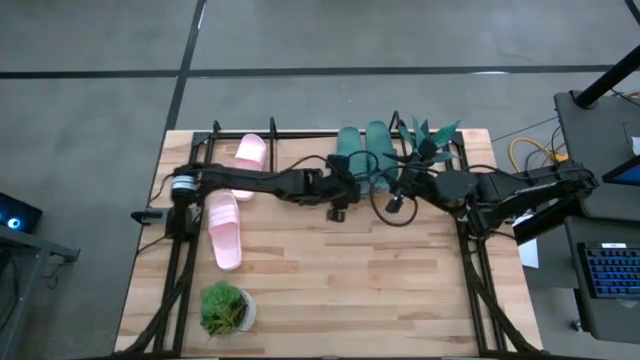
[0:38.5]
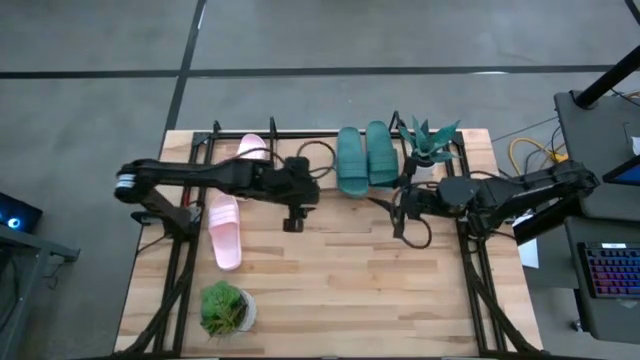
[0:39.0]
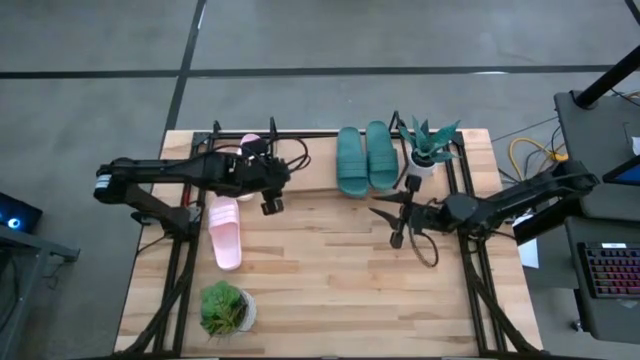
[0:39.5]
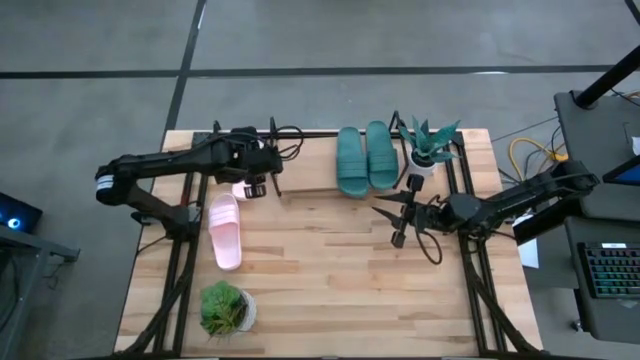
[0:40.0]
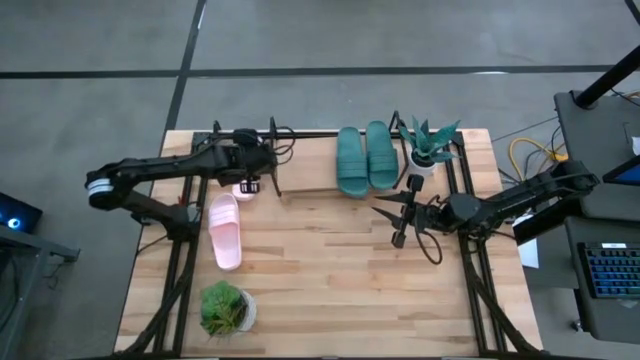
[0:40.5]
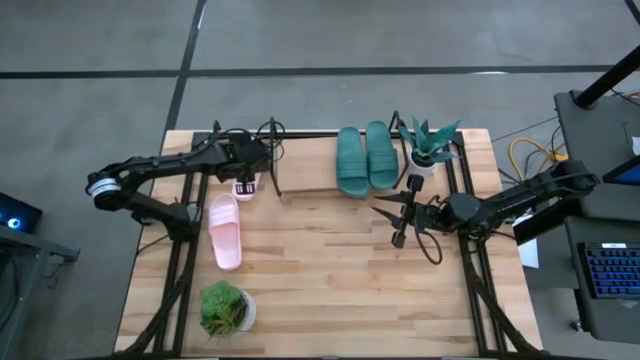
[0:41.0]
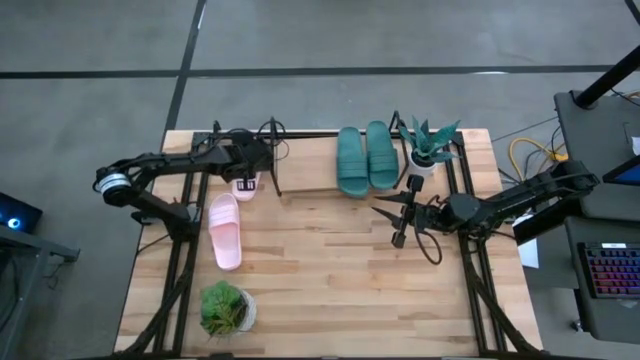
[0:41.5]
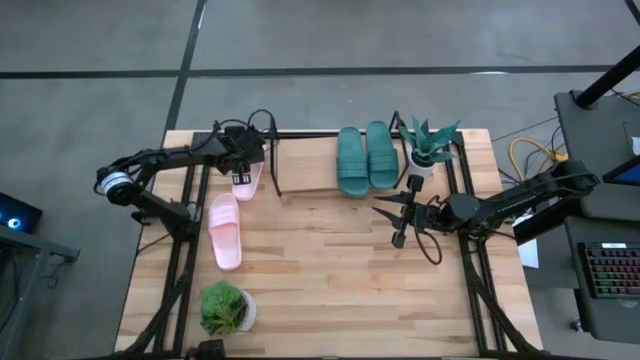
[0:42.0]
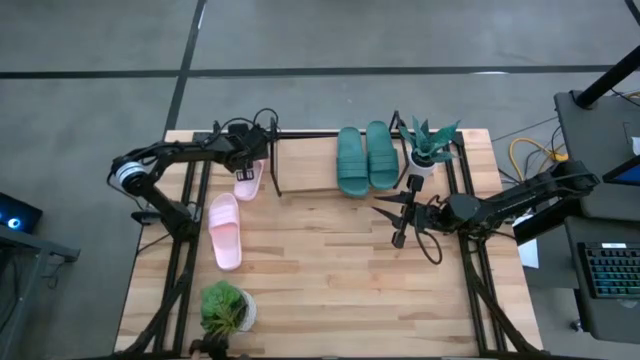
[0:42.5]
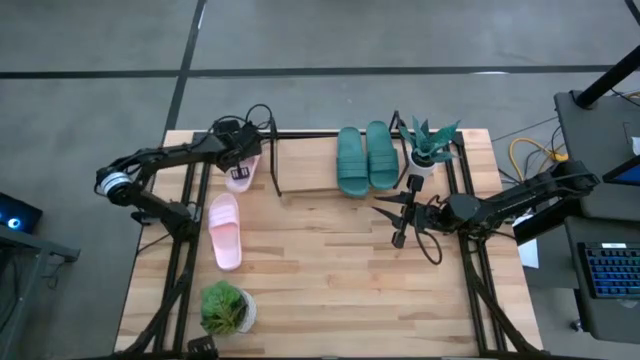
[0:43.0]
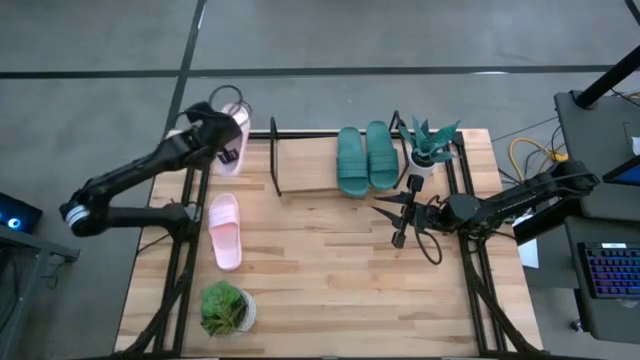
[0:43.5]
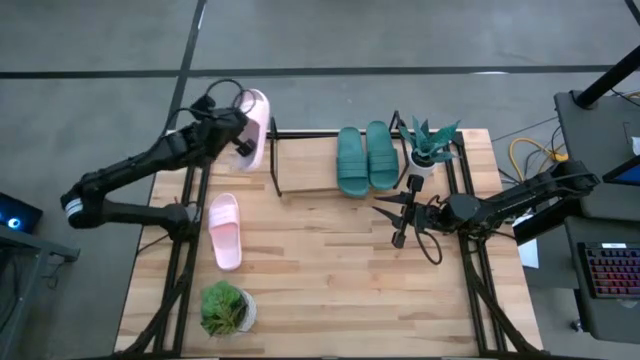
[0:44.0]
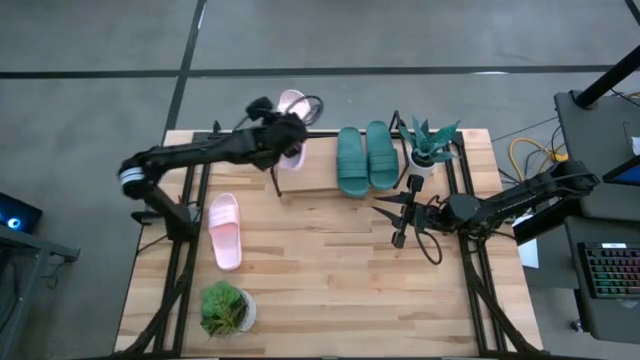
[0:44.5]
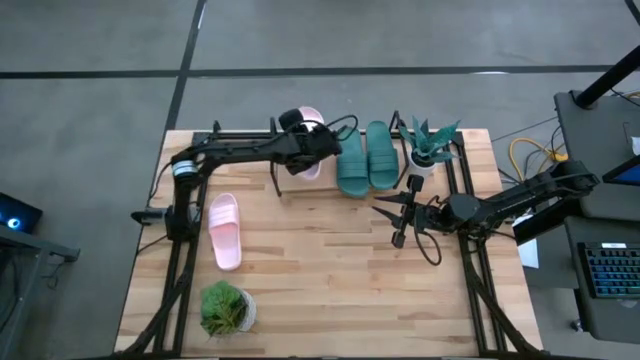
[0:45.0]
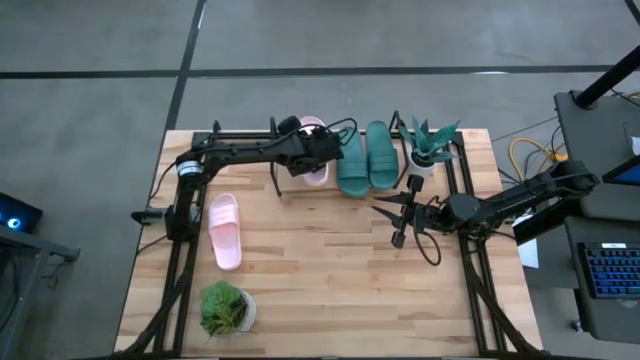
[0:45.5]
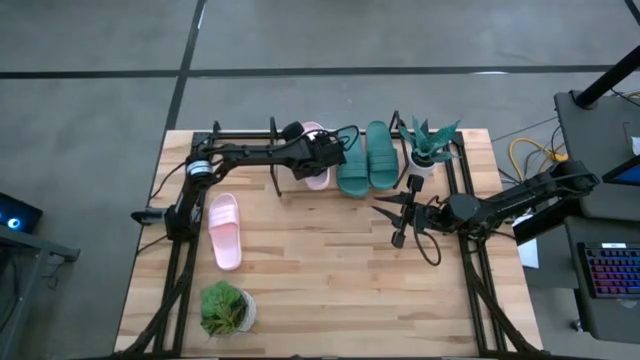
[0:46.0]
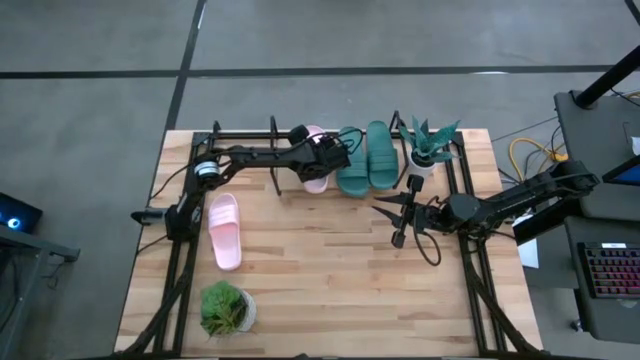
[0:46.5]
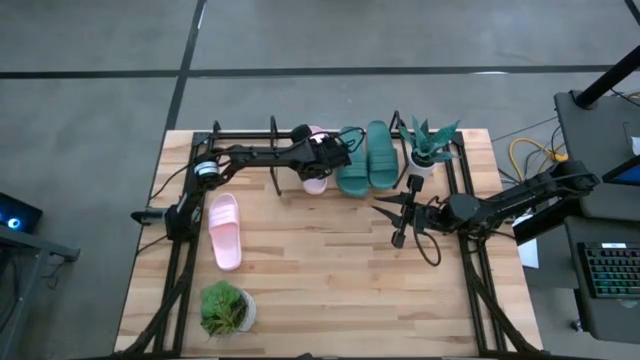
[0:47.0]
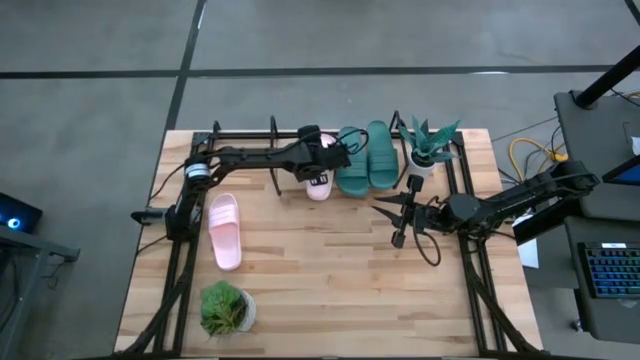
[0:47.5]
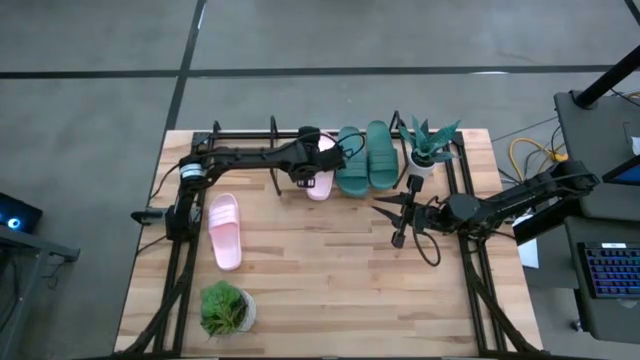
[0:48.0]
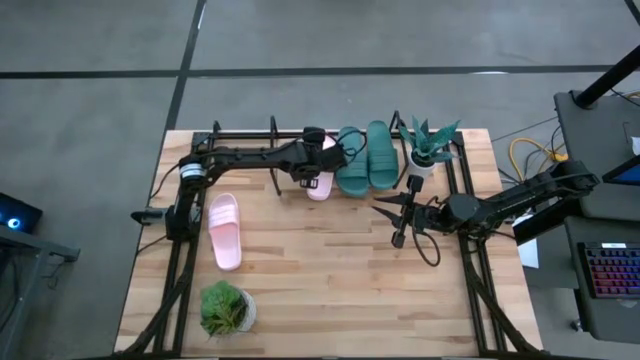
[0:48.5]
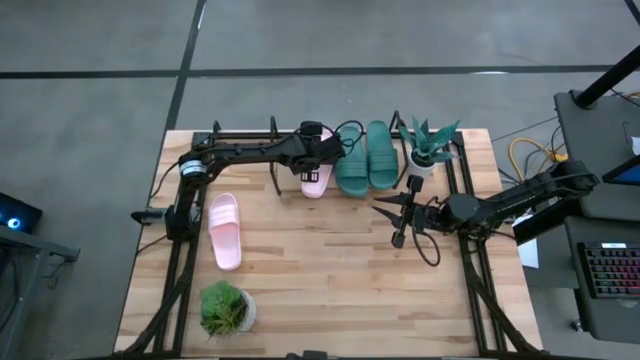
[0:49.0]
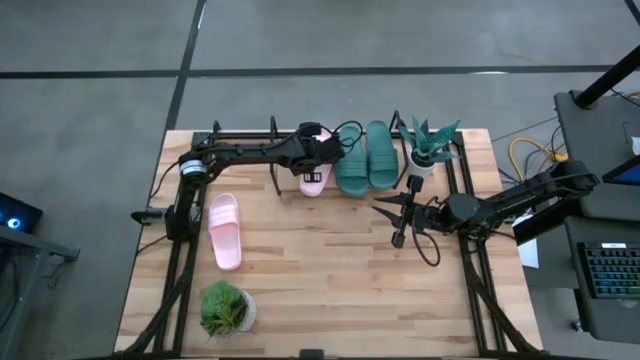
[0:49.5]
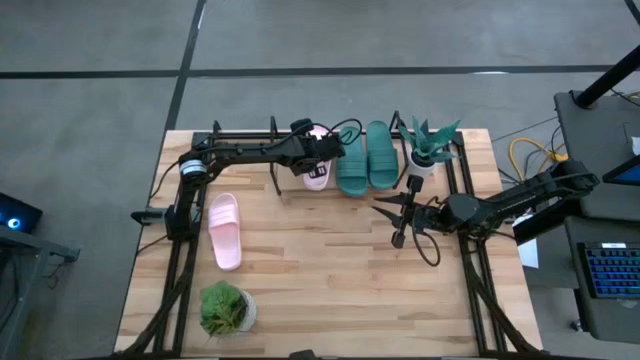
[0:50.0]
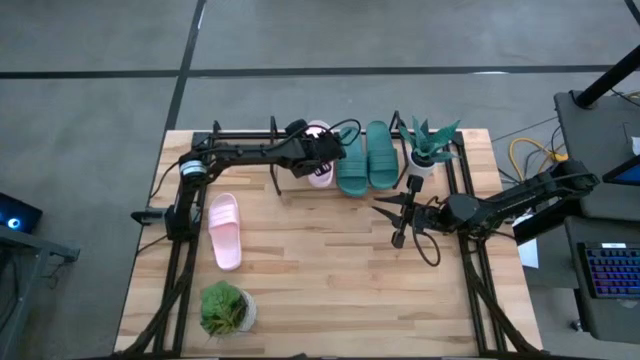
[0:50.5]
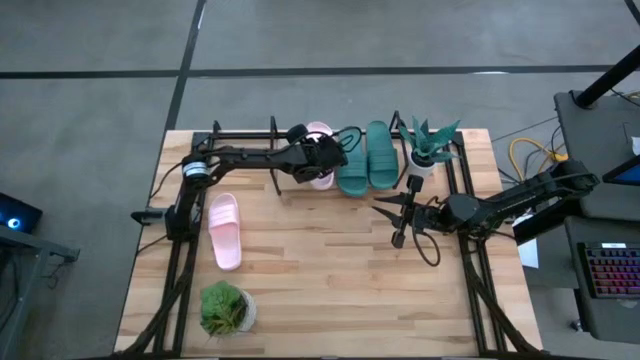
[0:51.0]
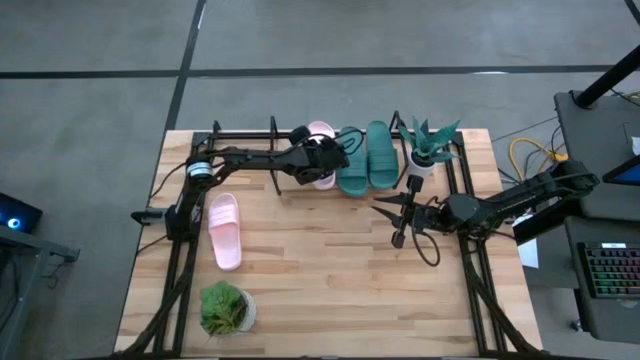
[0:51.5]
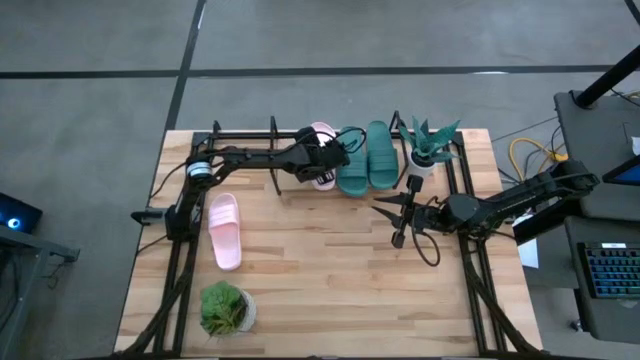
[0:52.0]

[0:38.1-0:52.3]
Task: Pick and place slides into the shelf
Put the top pink slide on the shelf

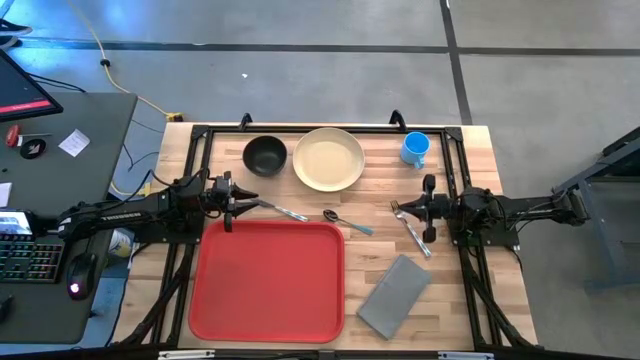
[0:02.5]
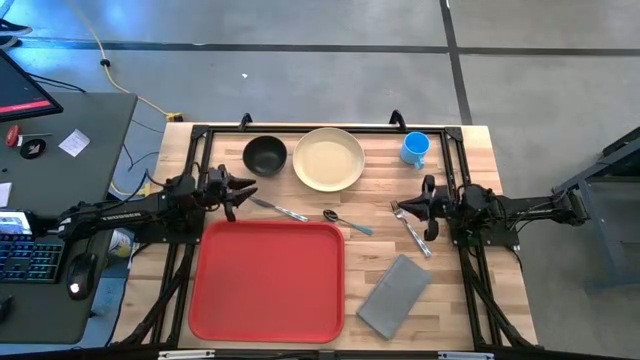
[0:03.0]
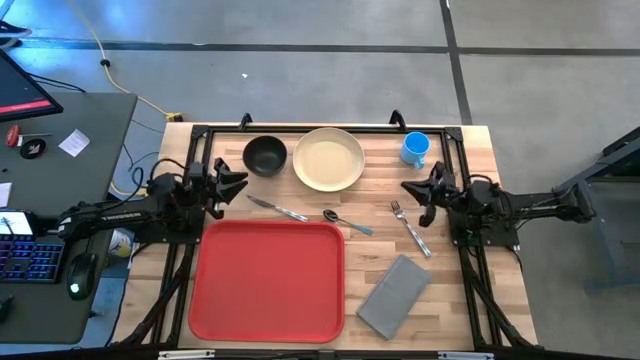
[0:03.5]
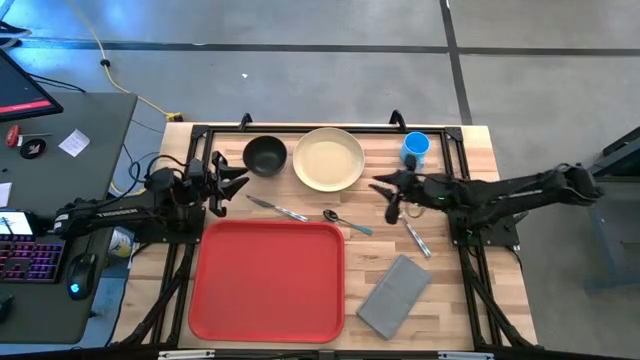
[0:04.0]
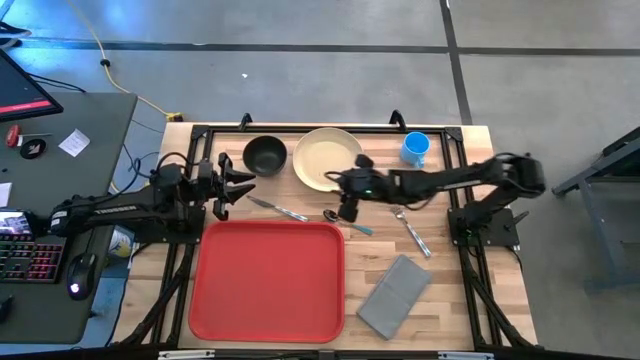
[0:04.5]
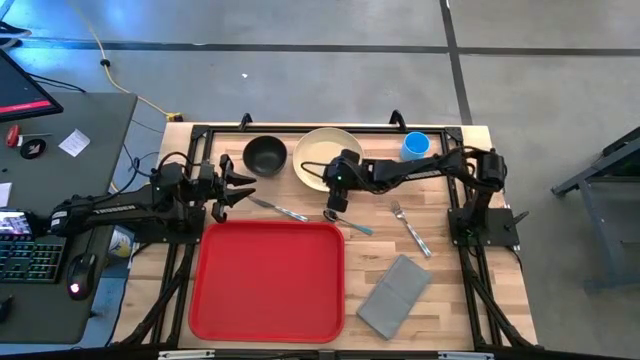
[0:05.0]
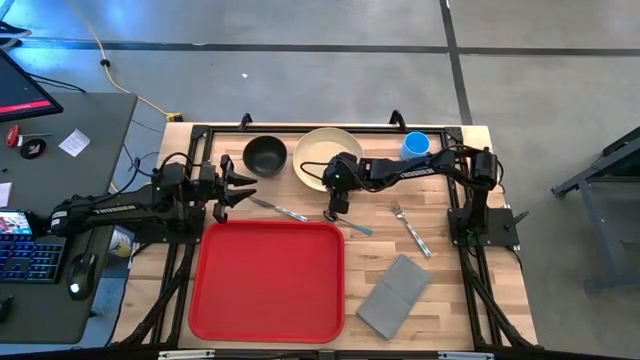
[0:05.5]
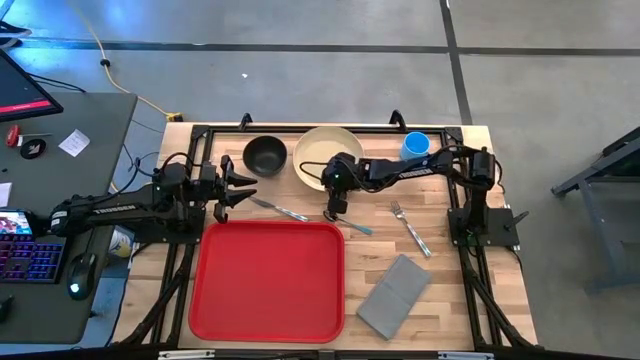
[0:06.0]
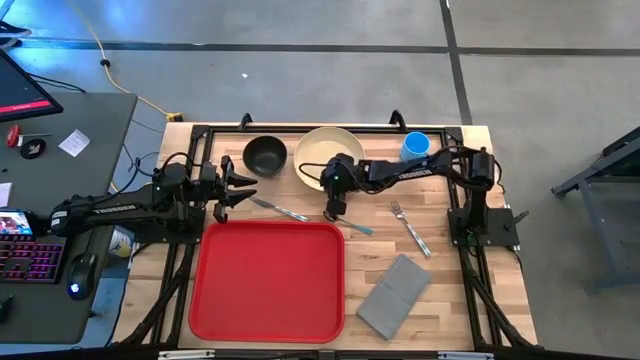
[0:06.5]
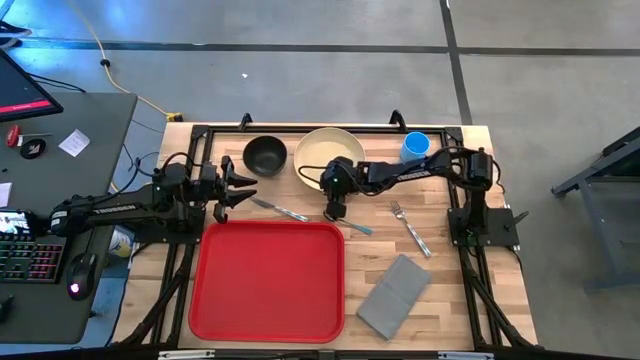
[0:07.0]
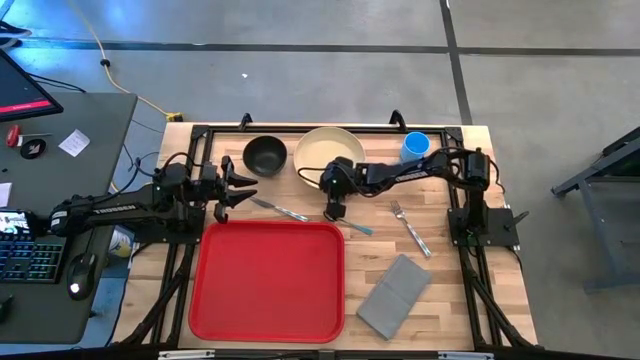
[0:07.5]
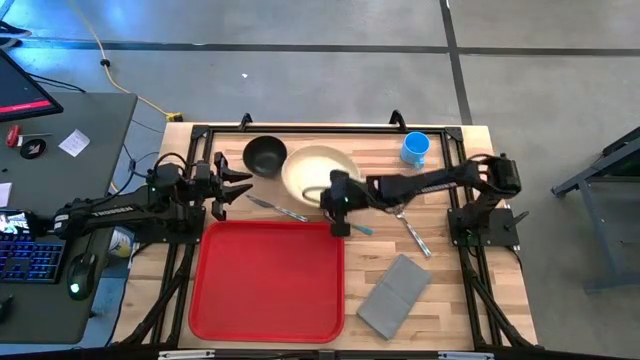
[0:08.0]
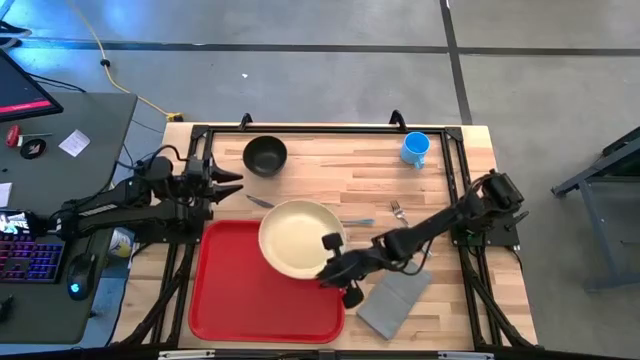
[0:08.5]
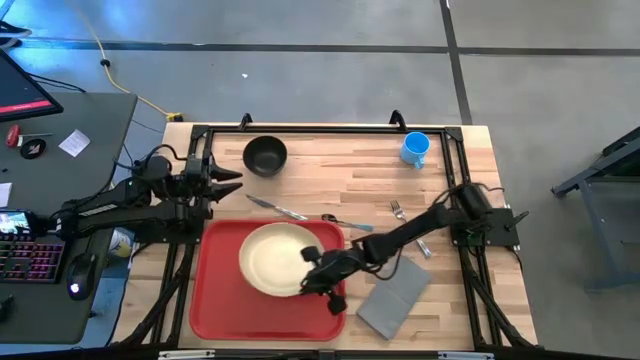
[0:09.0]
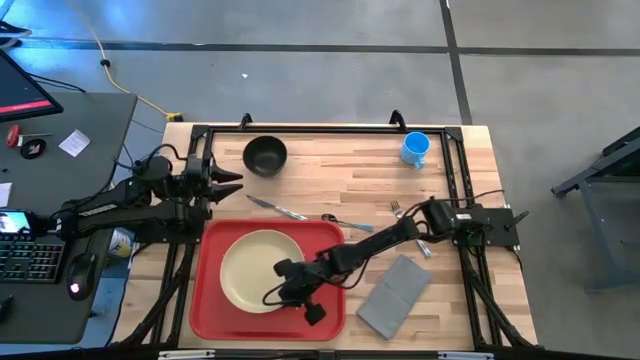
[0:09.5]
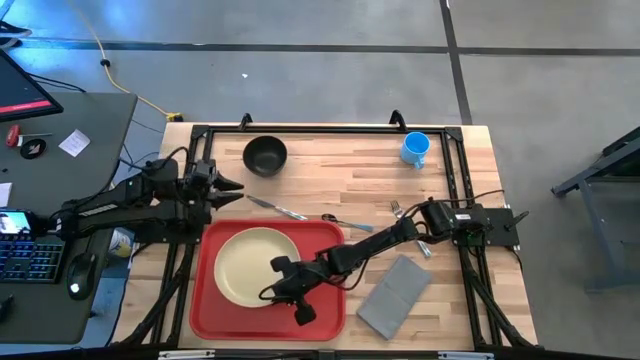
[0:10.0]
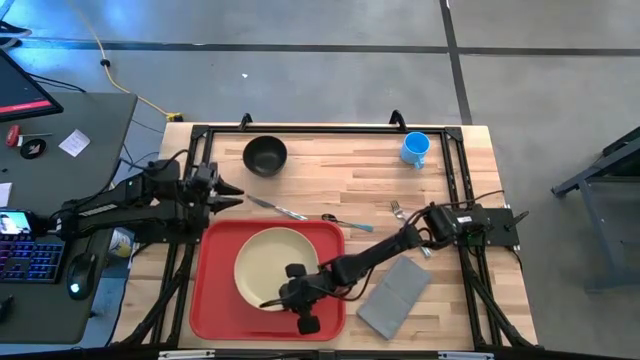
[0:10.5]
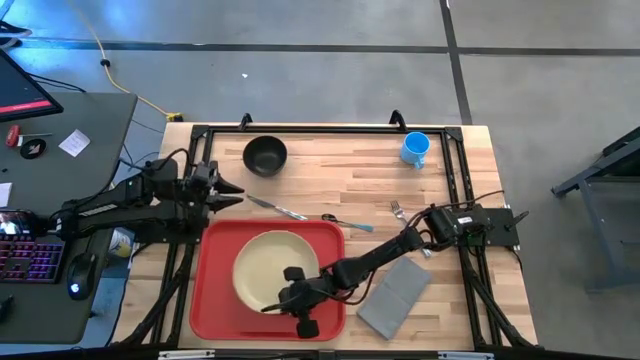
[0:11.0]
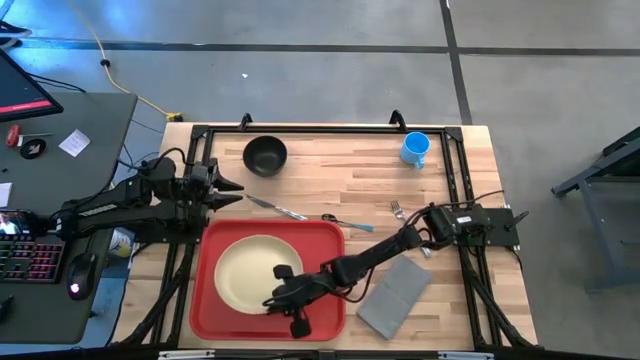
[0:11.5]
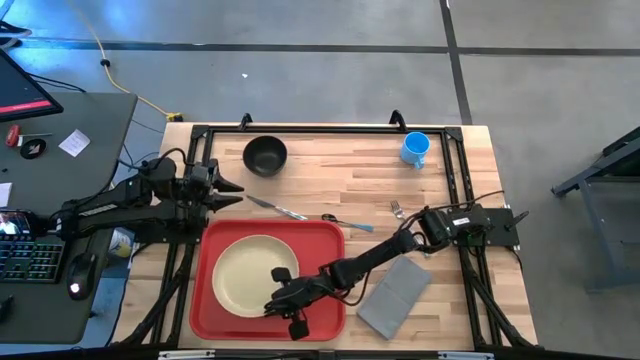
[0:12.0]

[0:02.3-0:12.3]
Task: Set up tray
Put the light brown plate on the red serving tray
